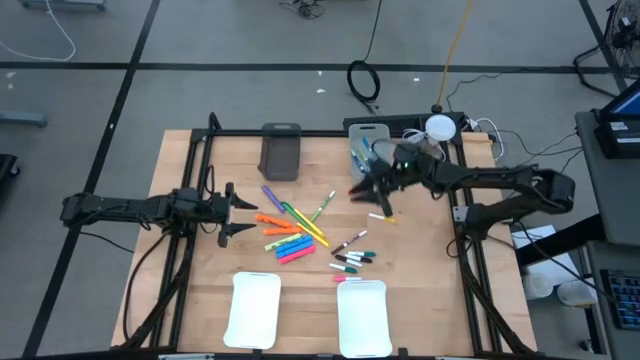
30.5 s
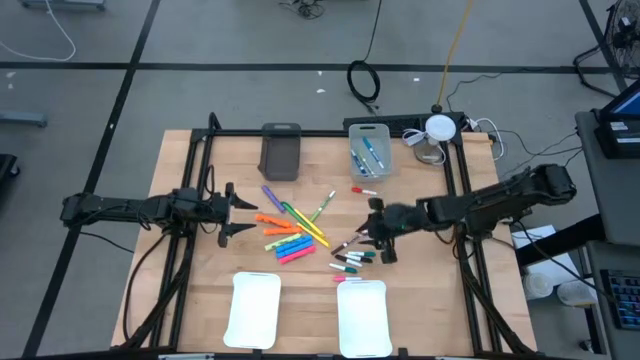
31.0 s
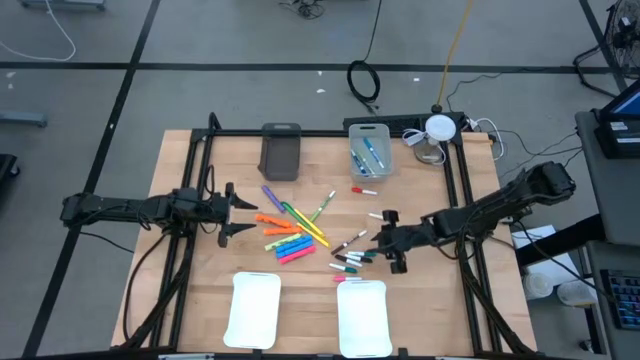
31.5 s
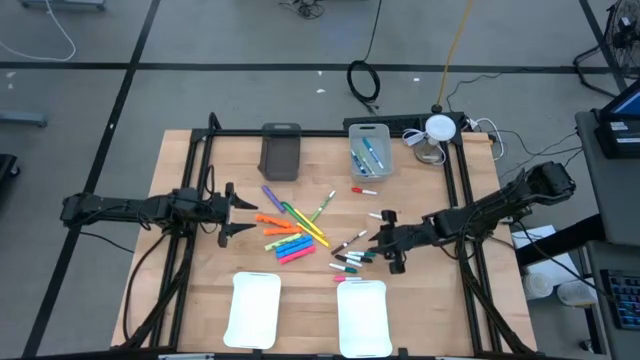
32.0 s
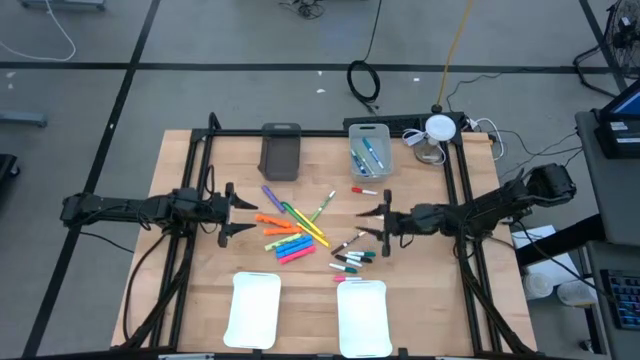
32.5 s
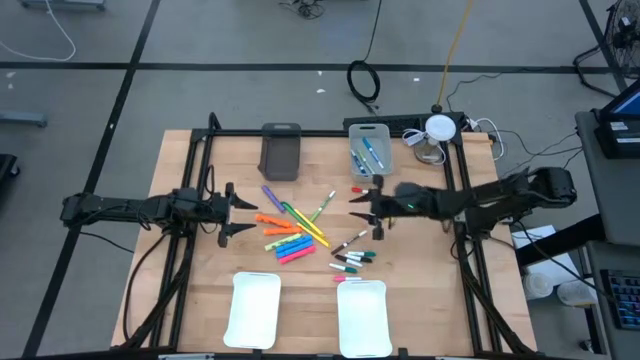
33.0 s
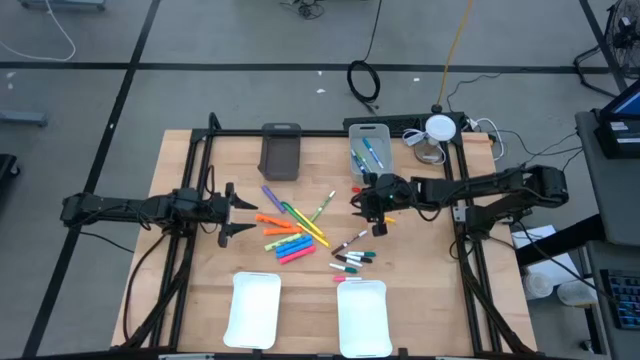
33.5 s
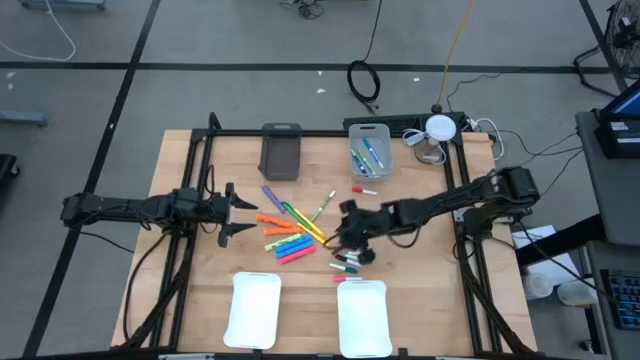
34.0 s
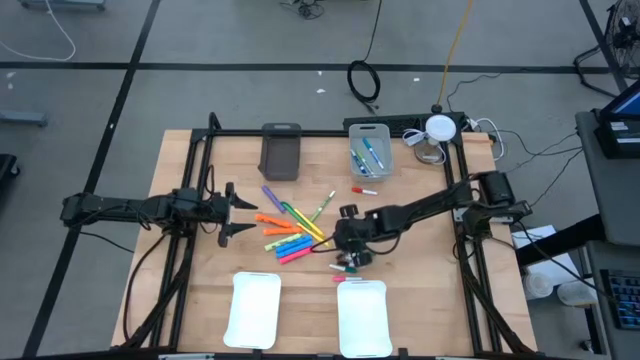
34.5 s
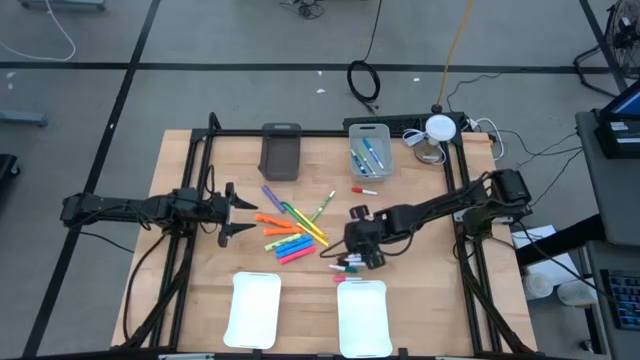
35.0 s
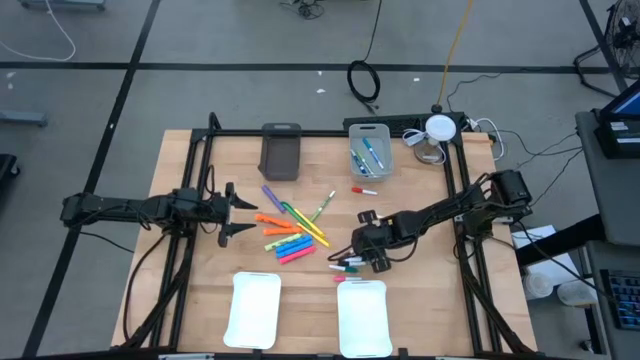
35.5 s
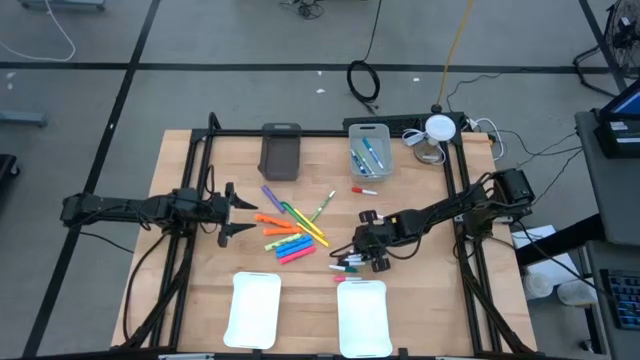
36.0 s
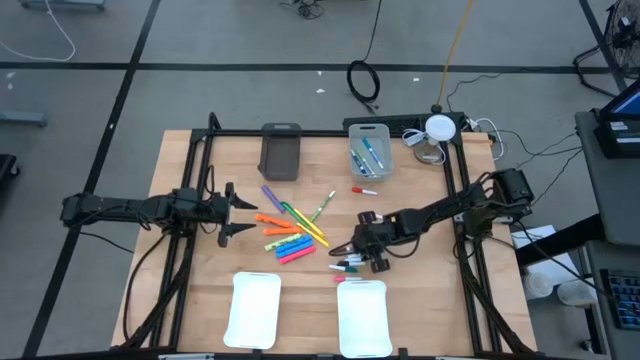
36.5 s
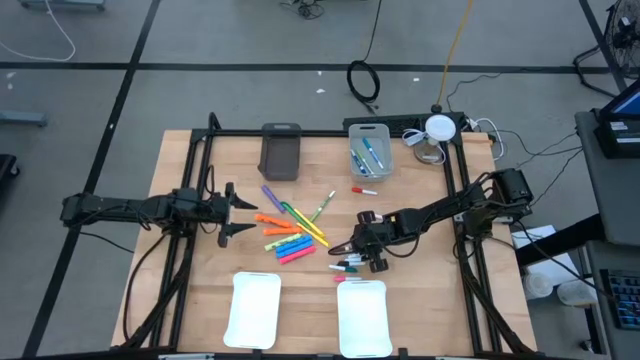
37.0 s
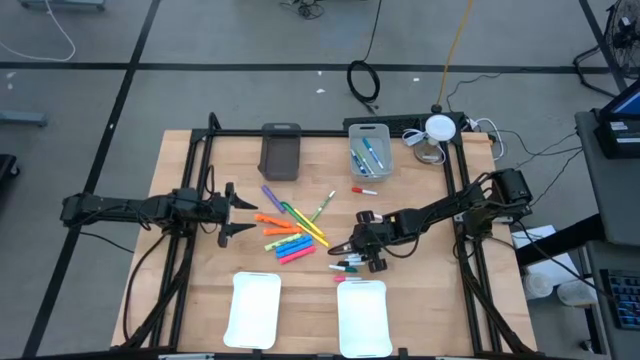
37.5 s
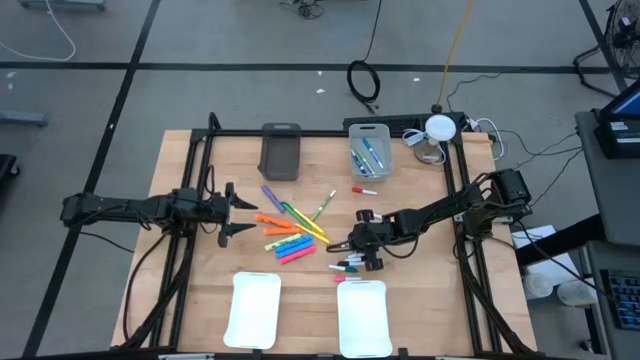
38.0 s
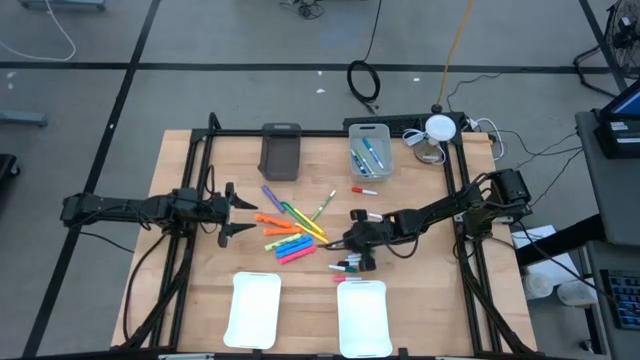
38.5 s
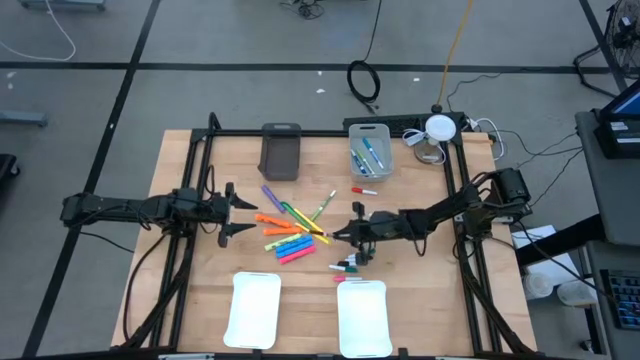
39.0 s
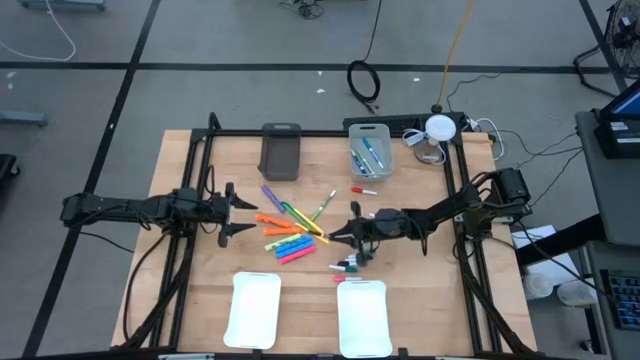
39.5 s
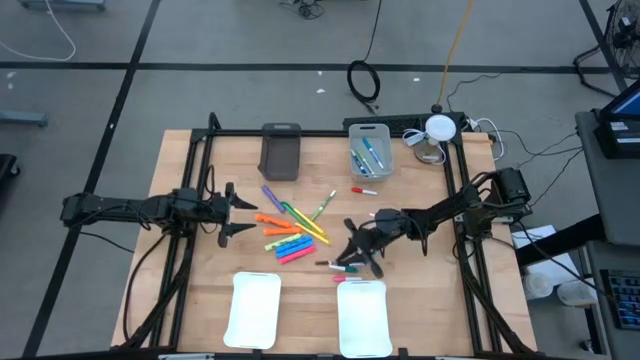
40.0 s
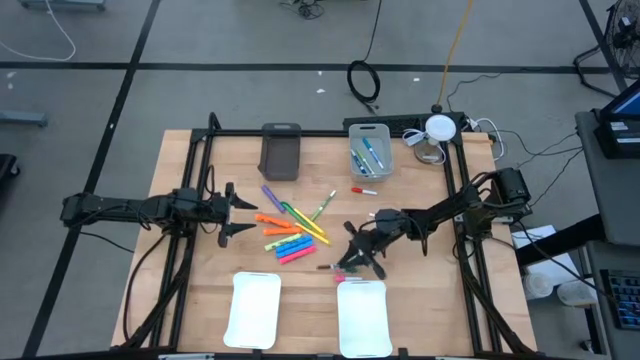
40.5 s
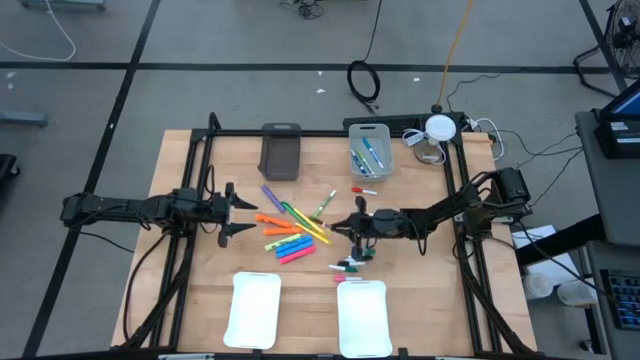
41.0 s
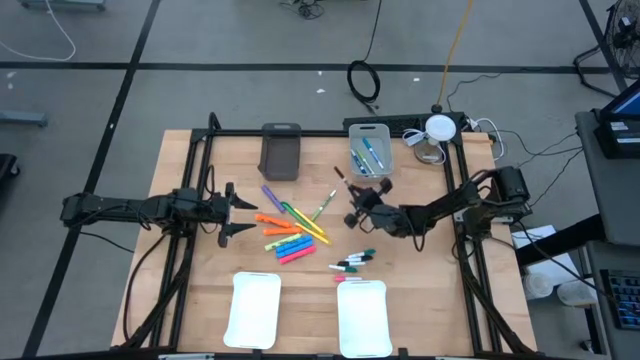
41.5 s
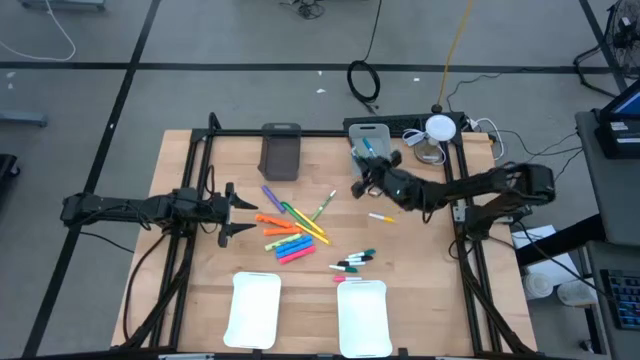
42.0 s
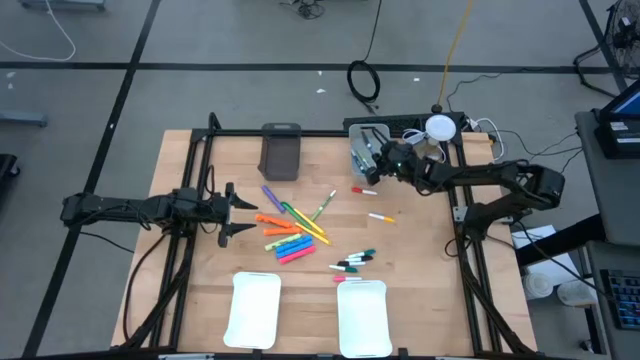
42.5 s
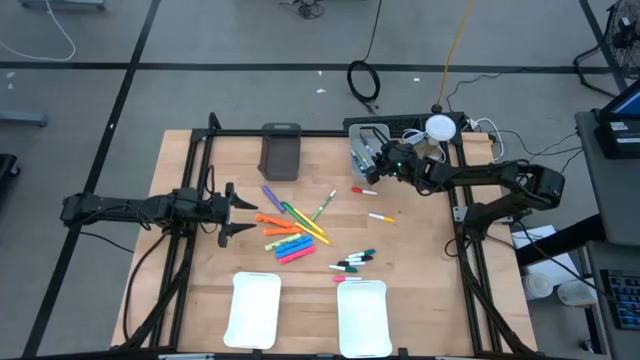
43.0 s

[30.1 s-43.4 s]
Task: Pick & Place Markers
Put the brown marker pen into the gray bin

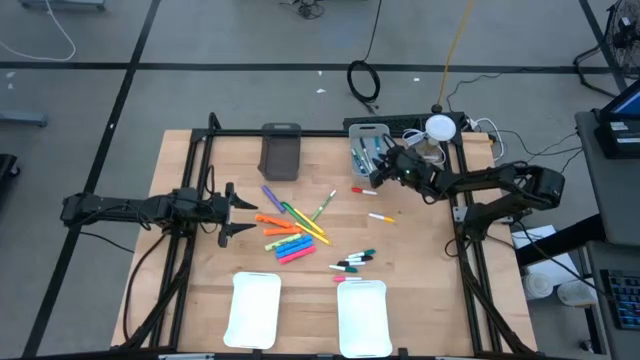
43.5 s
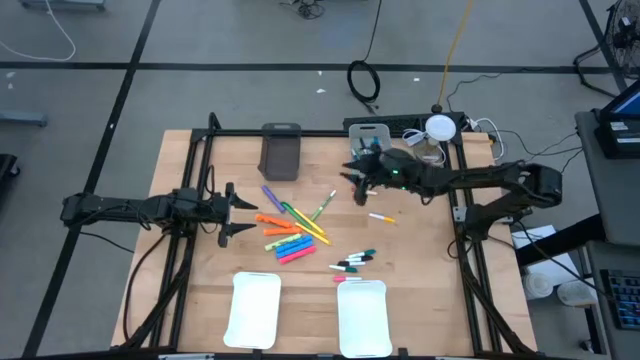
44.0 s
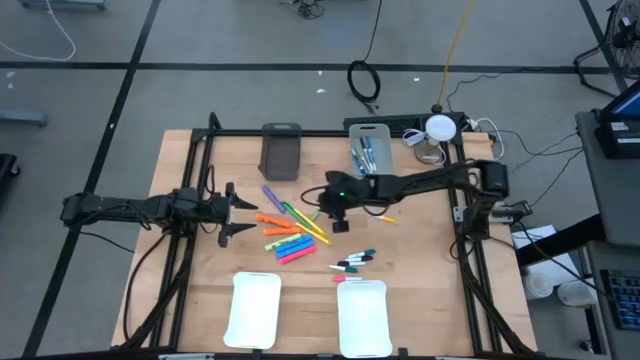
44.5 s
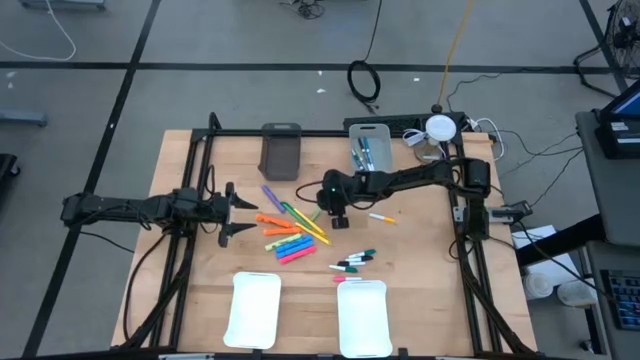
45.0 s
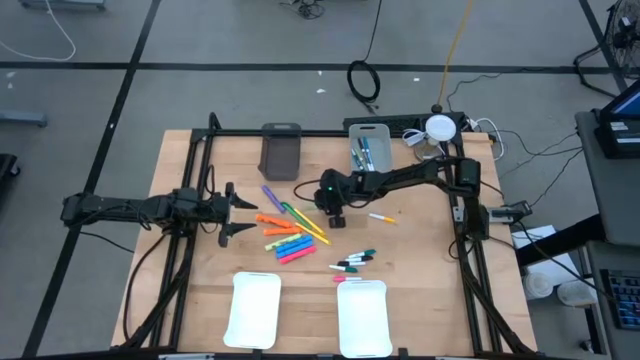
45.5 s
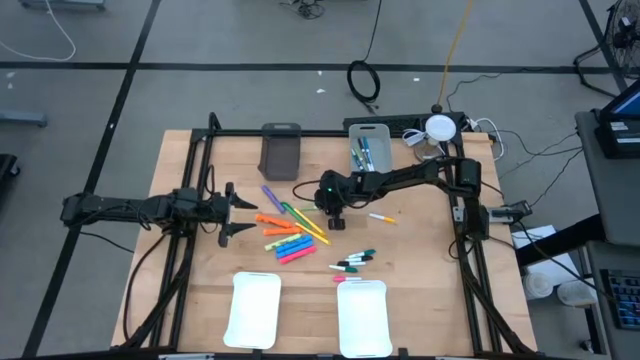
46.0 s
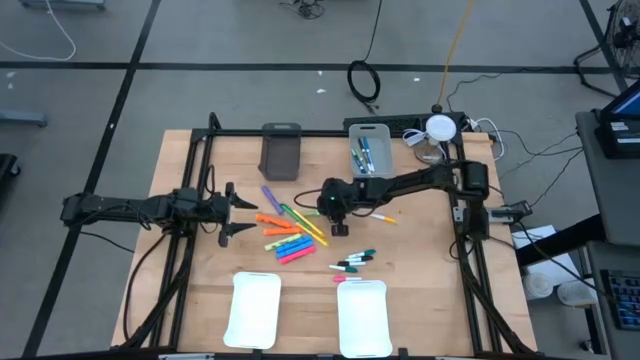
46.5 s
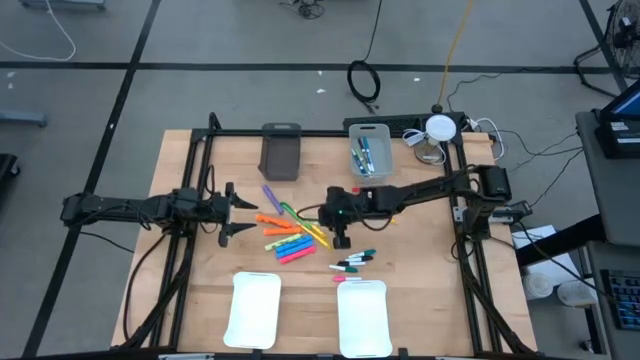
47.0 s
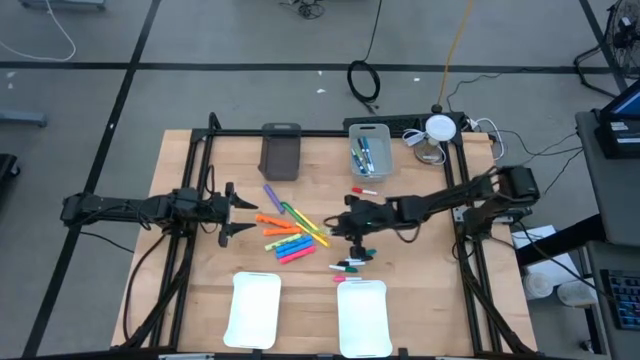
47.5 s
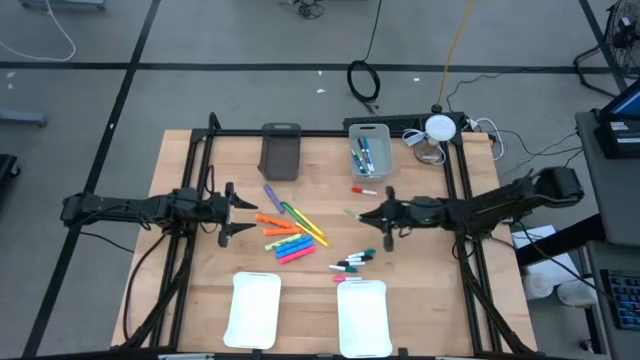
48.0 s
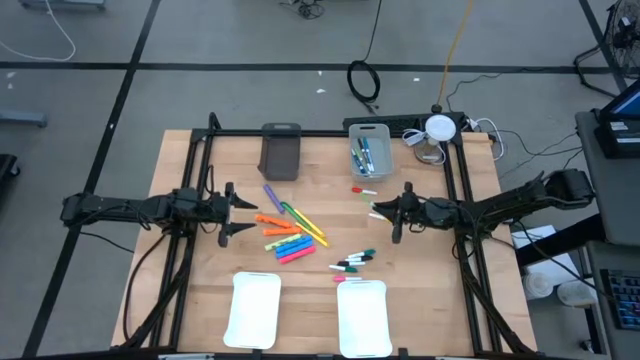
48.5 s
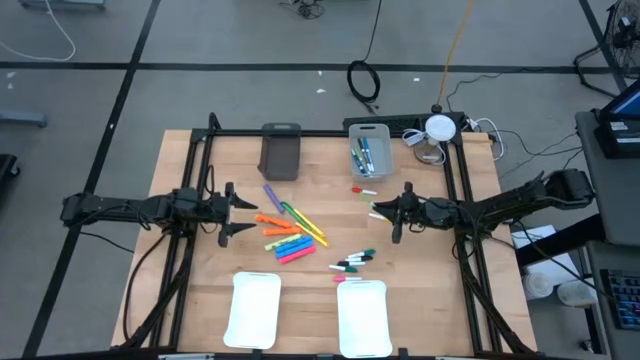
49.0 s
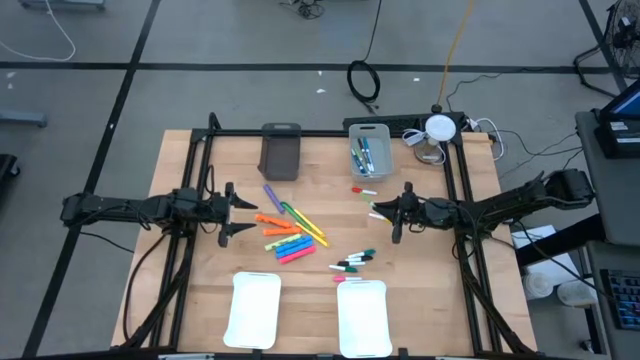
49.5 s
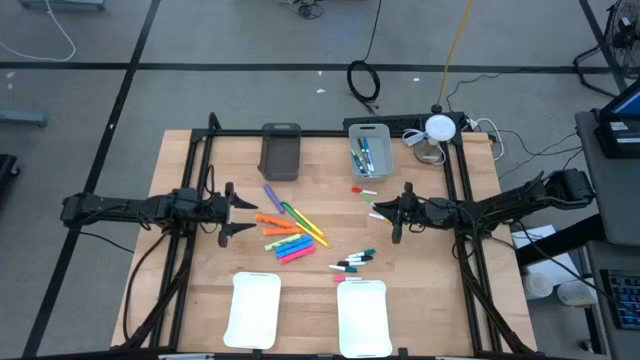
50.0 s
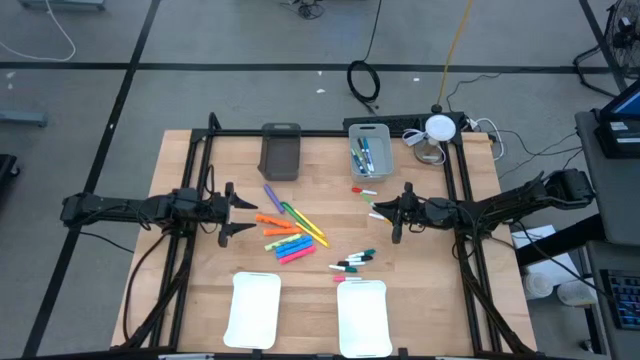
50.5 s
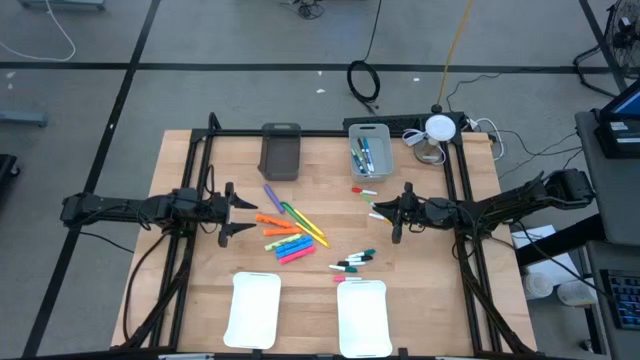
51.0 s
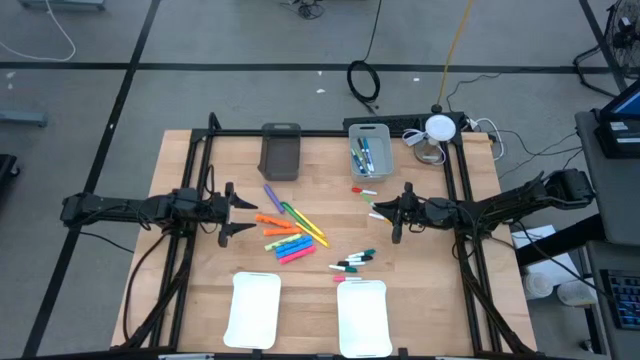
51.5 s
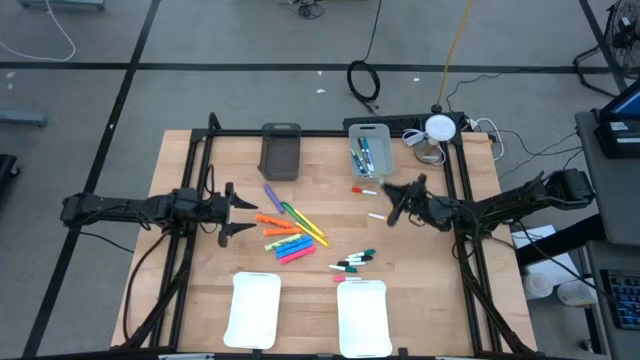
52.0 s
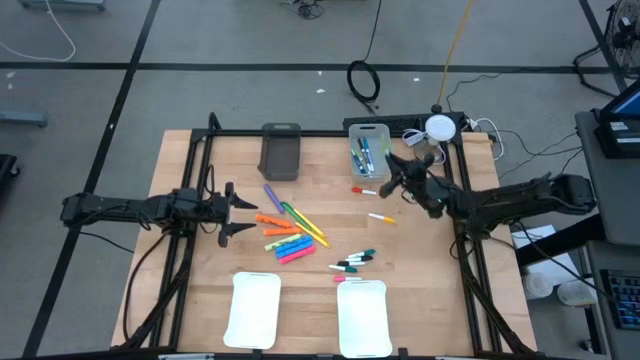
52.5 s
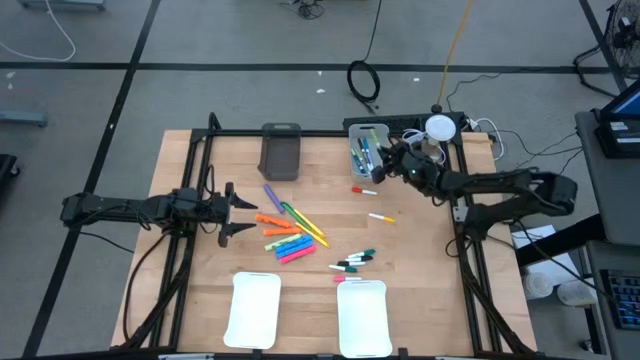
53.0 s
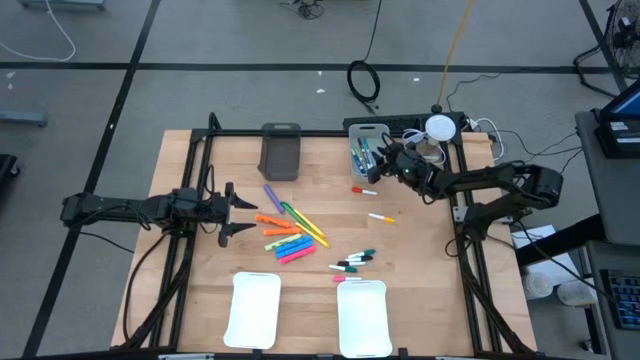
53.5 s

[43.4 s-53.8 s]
Put the green marker pen into the gray bin
